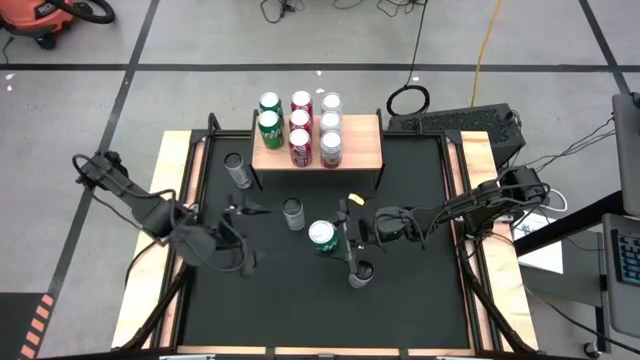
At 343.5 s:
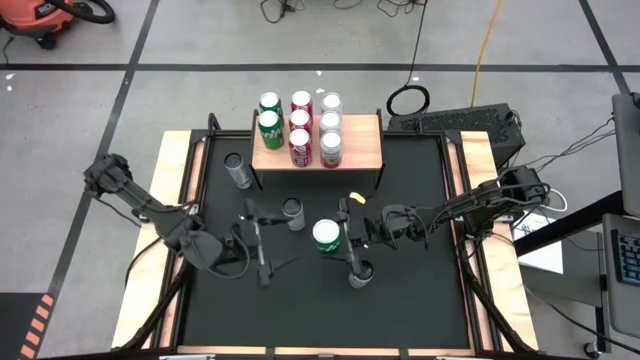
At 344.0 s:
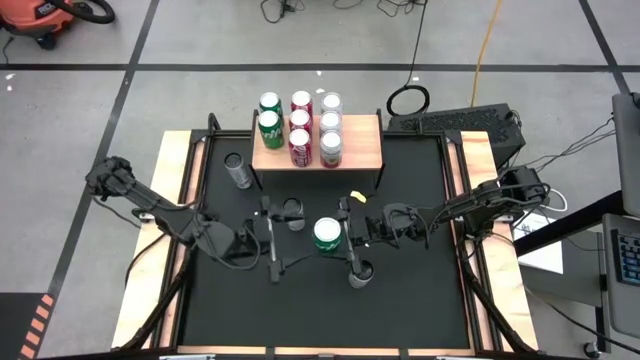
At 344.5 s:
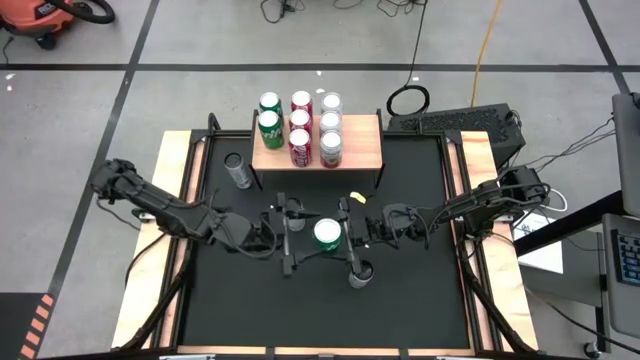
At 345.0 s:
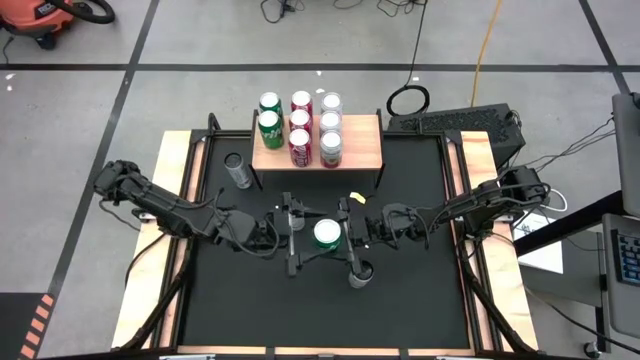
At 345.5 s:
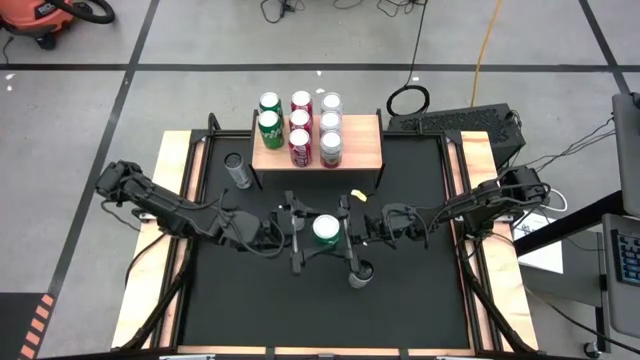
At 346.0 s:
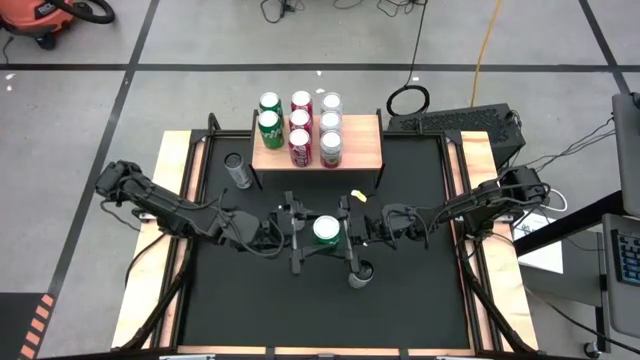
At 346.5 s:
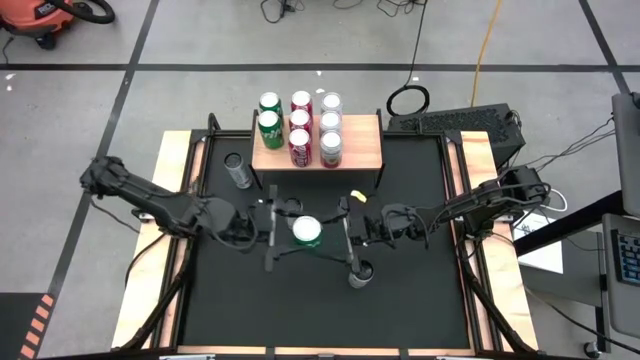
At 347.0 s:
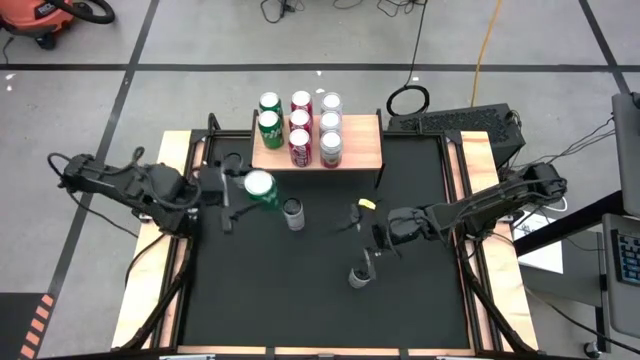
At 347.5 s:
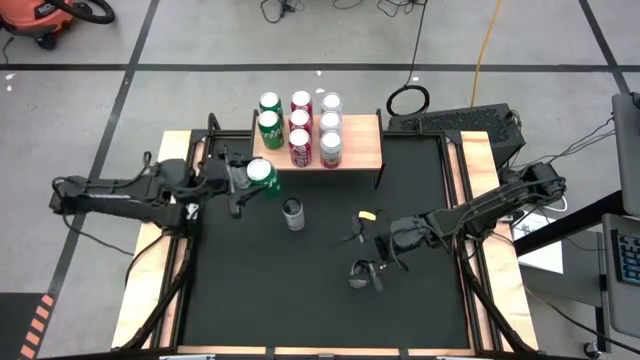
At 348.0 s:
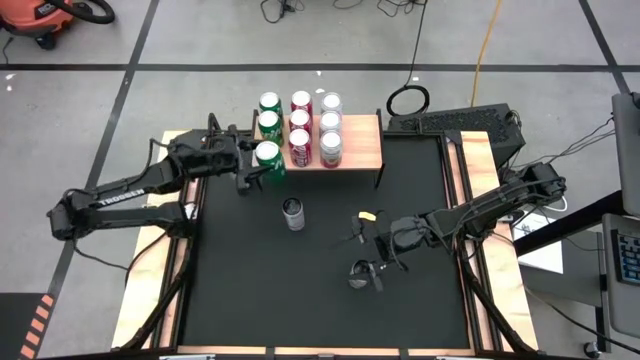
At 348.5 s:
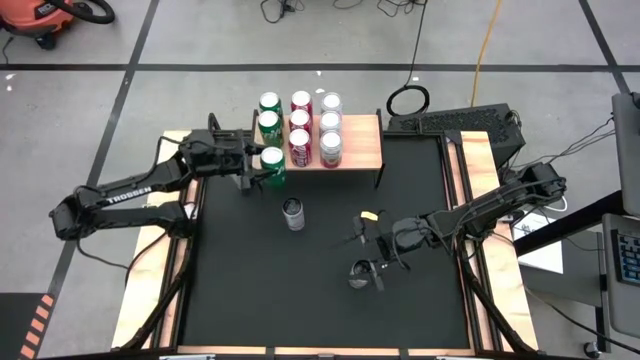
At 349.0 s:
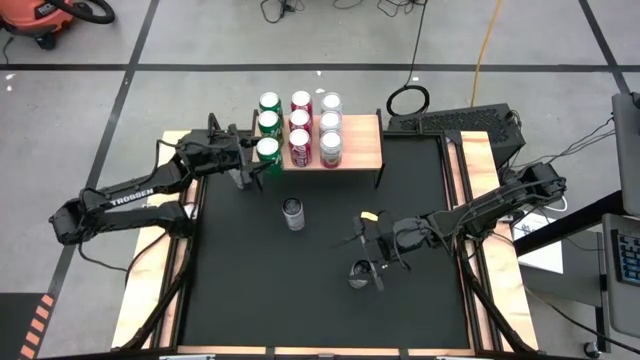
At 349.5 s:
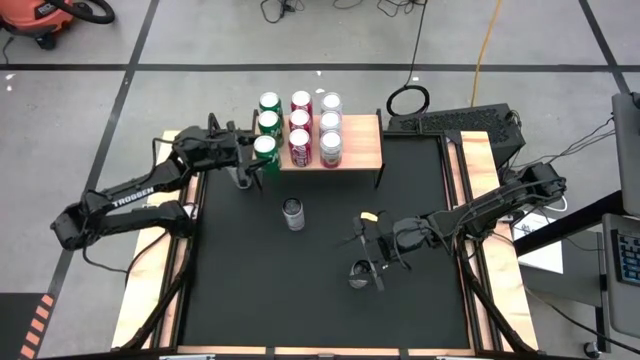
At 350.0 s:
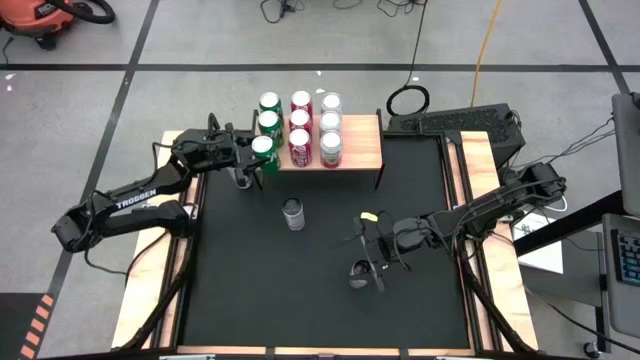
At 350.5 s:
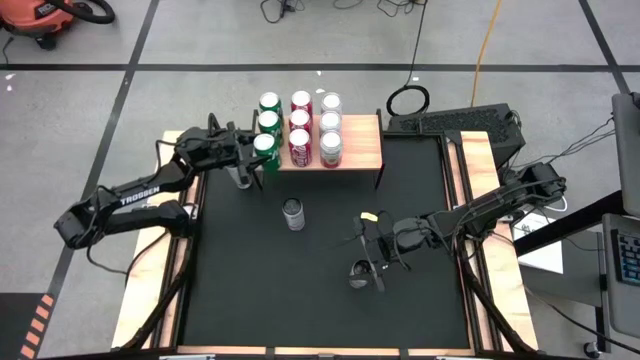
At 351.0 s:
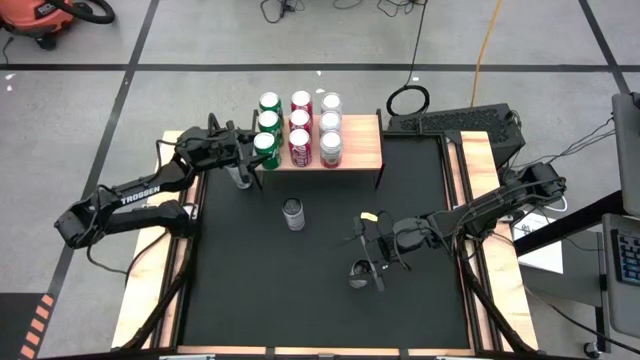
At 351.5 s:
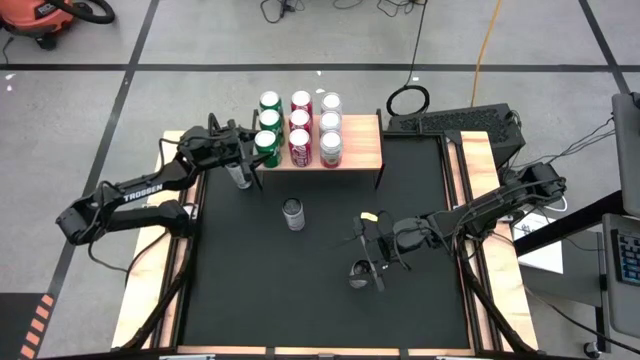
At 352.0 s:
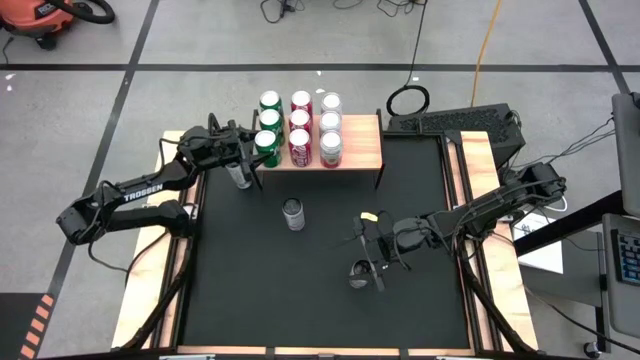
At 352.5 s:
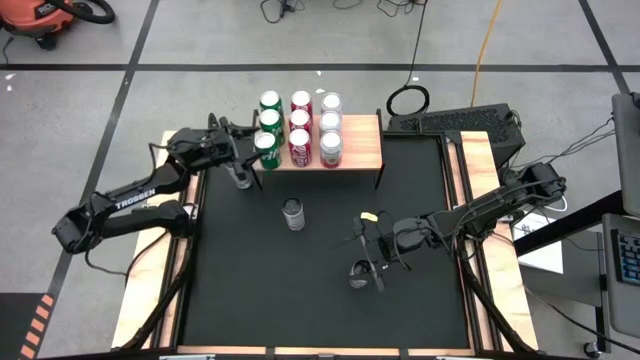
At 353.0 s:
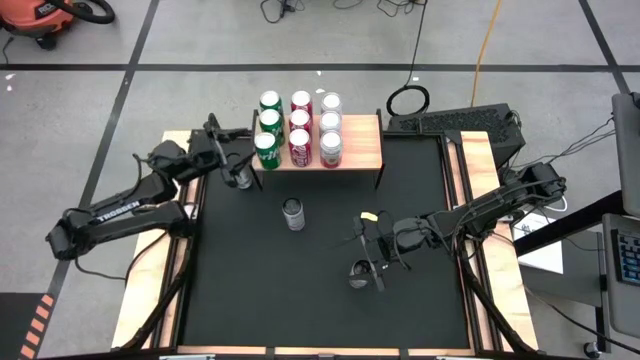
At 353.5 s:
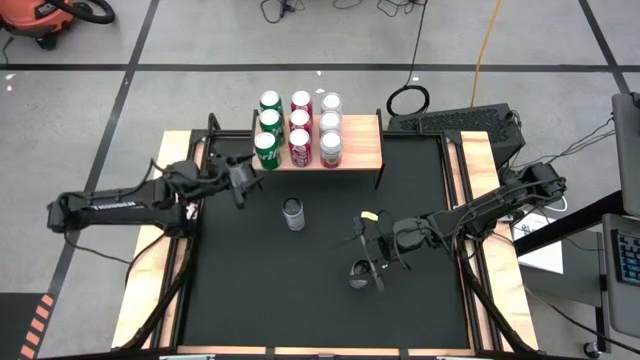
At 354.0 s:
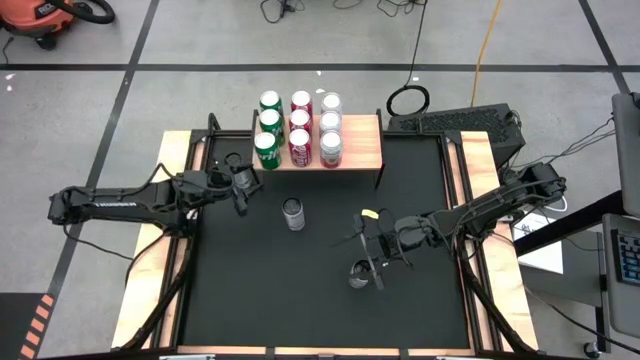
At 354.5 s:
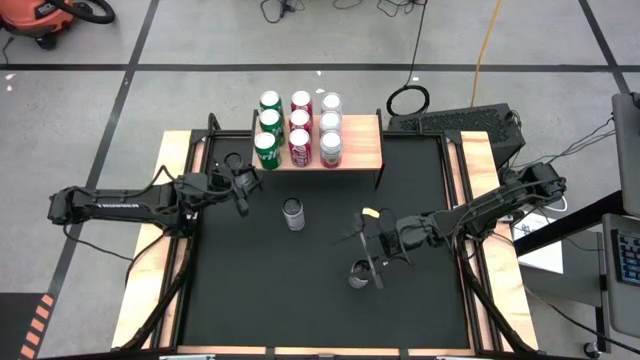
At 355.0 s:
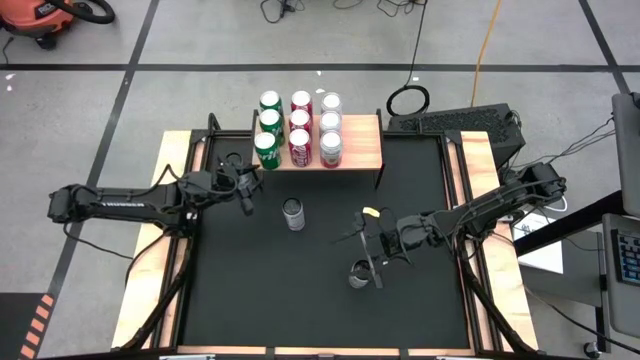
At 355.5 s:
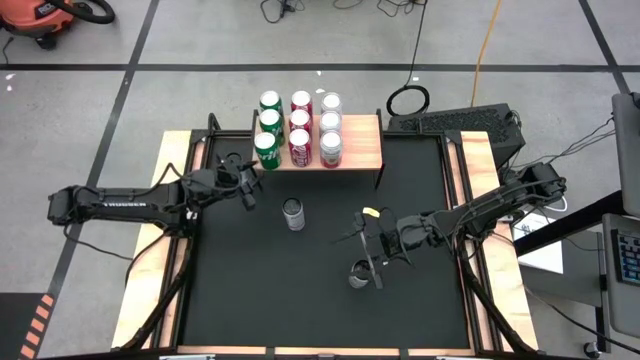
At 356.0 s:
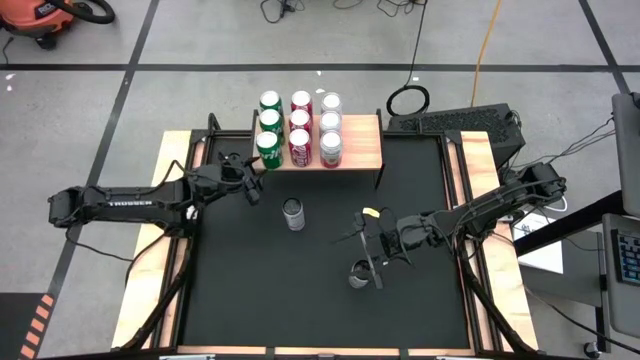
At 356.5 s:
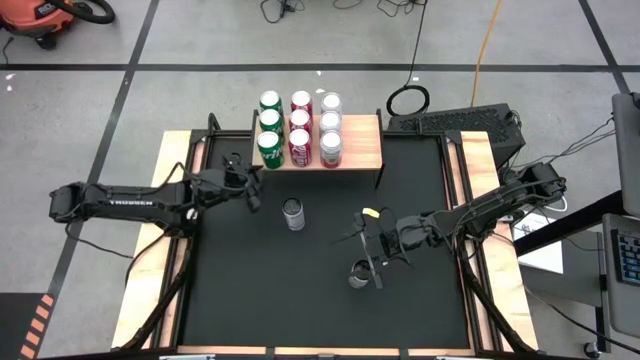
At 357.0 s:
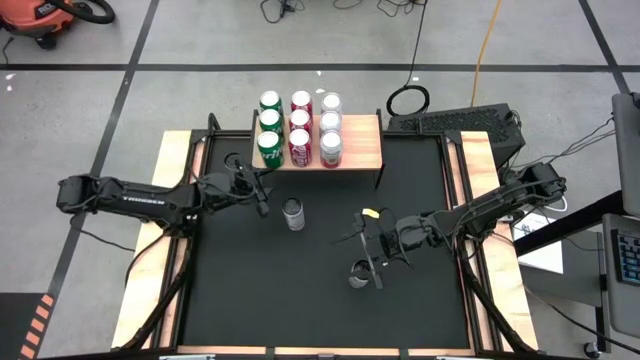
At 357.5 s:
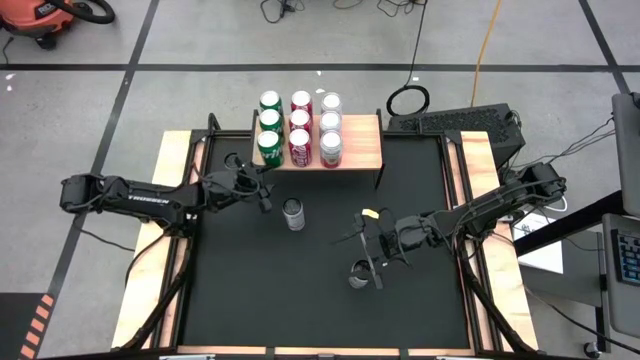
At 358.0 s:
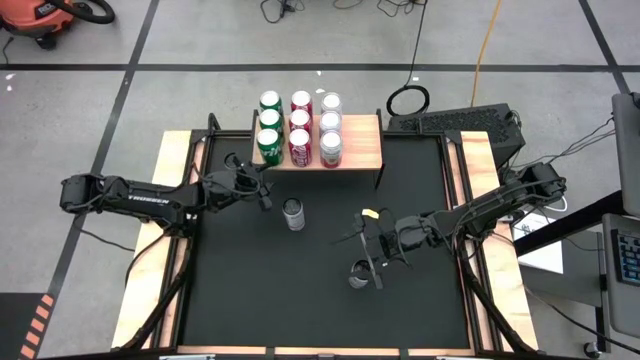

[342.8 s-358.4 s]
Task: Place canned beverage on shelf
Put the green soda can on the shelf aligned with the other green soda cans

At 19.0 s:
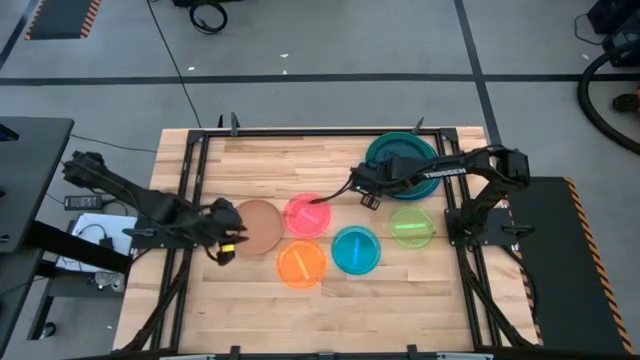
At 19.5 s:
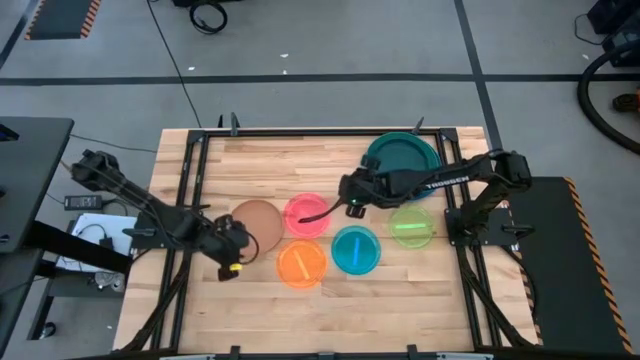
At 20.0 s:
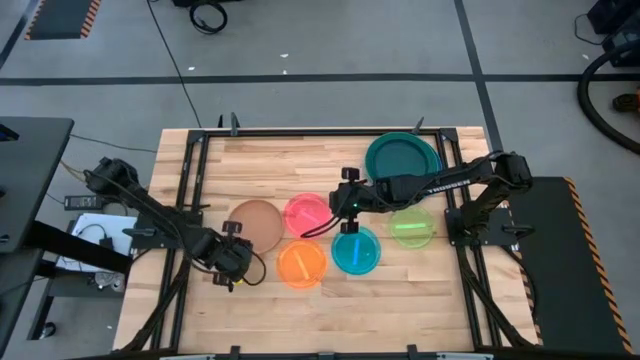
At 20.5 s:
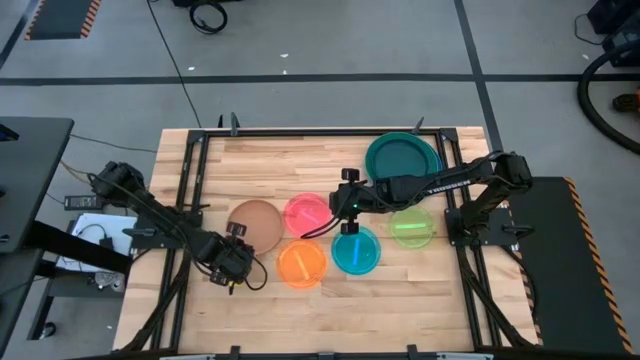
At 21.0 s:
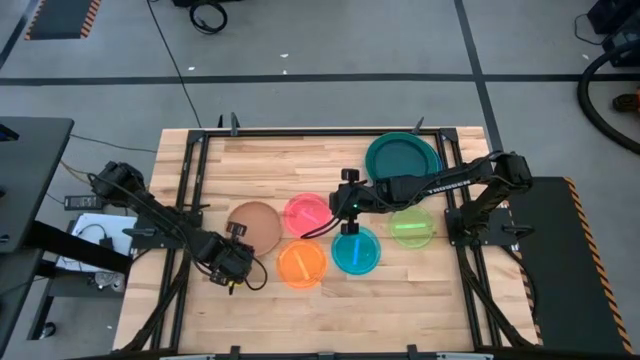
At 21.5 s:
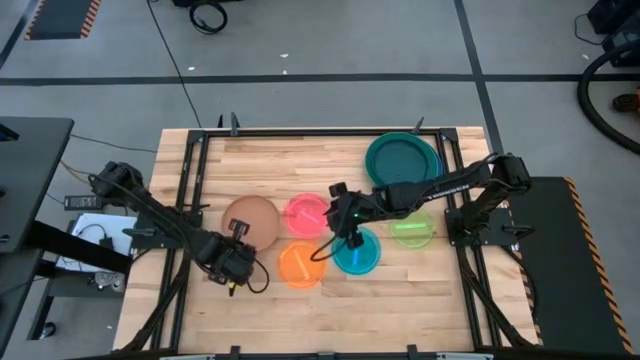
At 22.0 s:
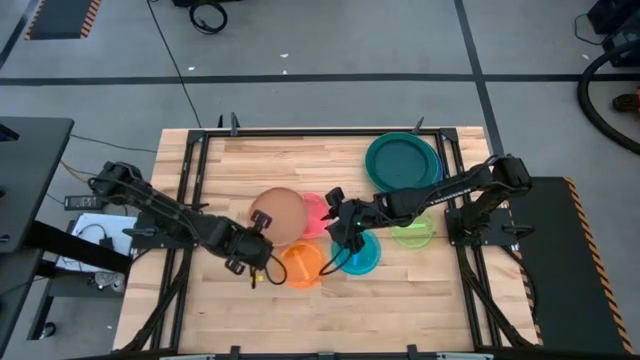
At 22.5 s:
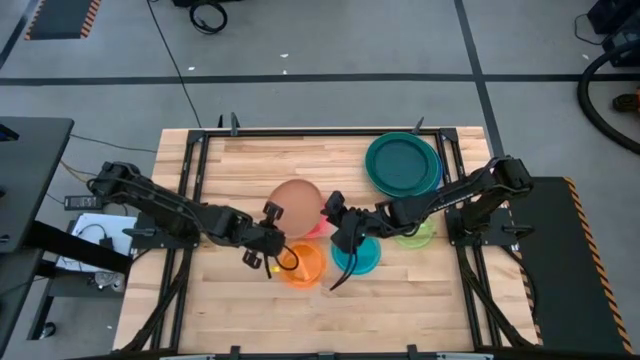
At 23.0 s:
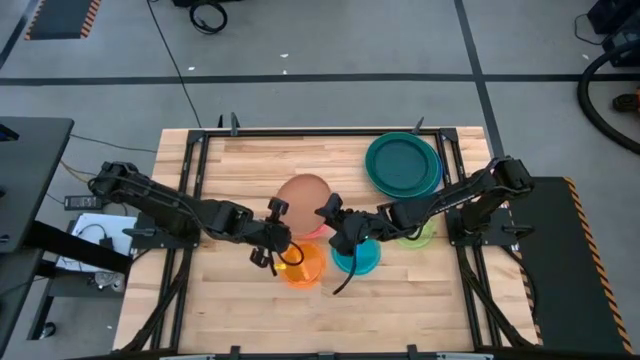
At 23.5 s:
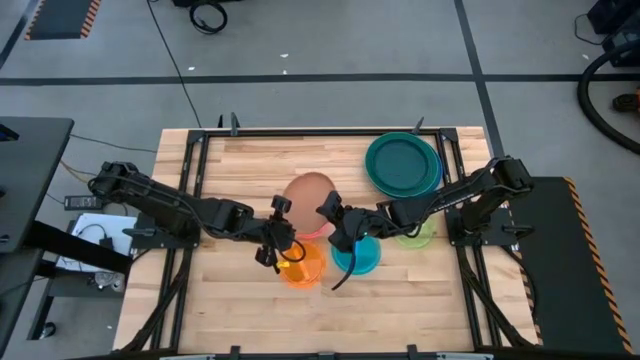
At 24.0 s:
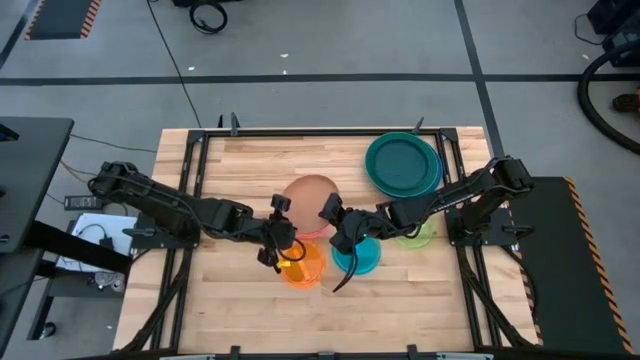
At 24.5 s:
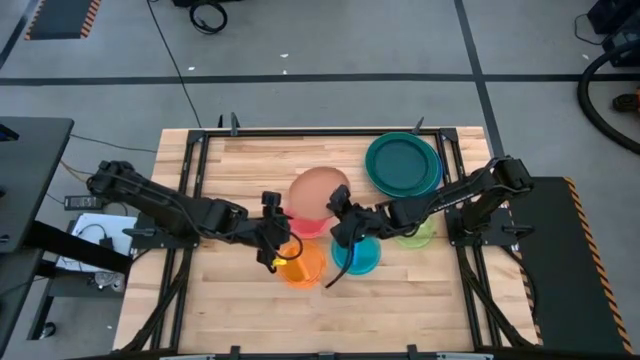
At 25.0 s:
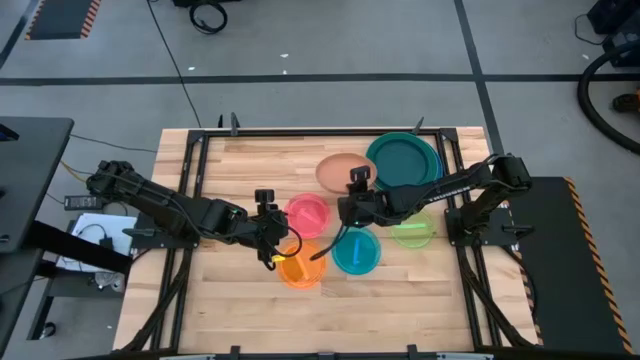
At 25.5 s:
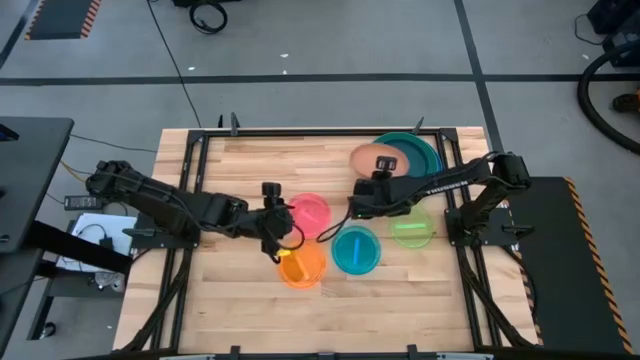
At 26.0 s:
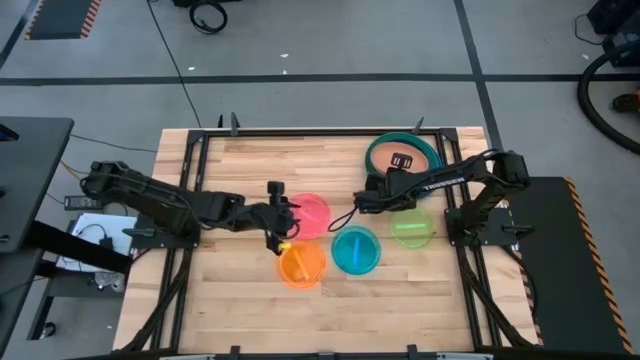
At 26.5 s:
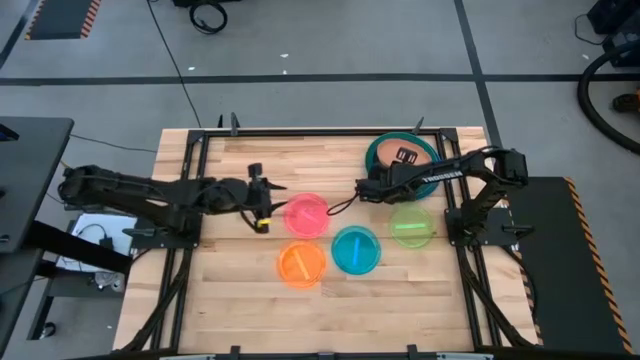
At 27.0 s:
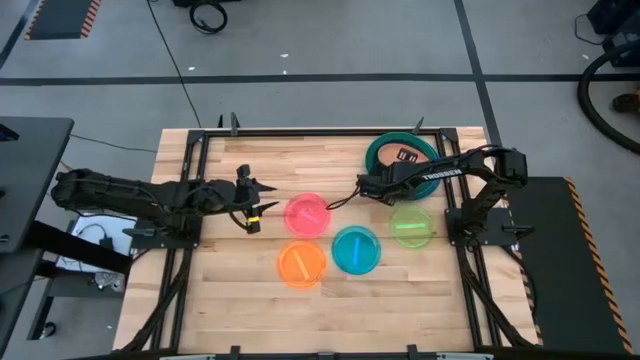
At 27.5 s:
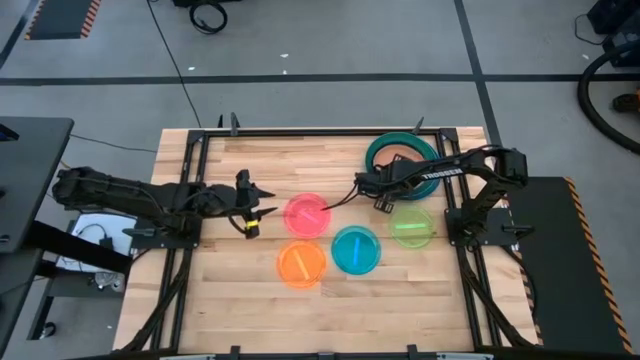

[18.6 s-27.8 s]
Task: Stack plastic plates
Stack the brown plate on top of the dark green plate
